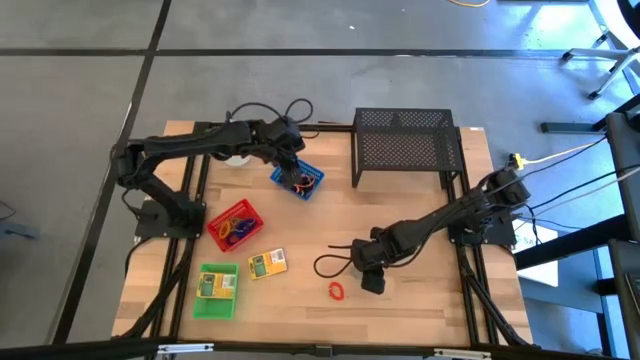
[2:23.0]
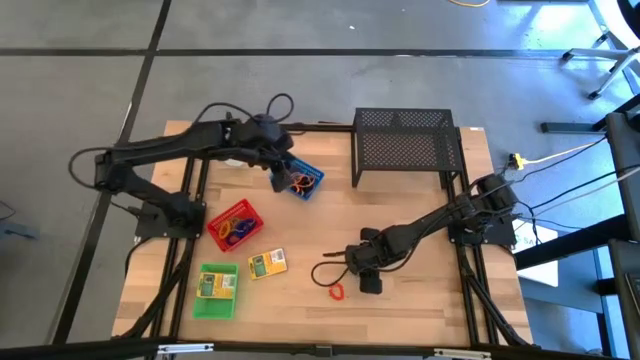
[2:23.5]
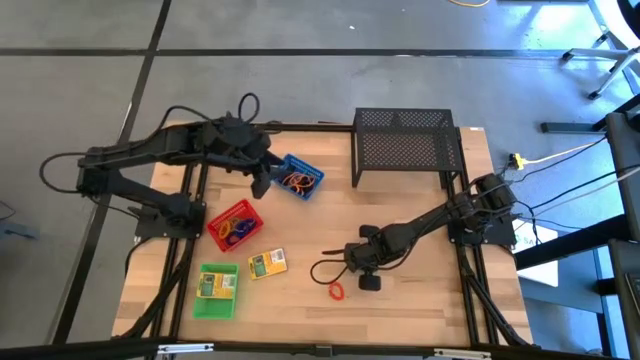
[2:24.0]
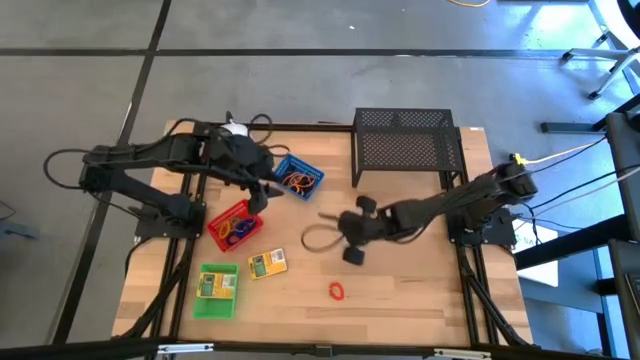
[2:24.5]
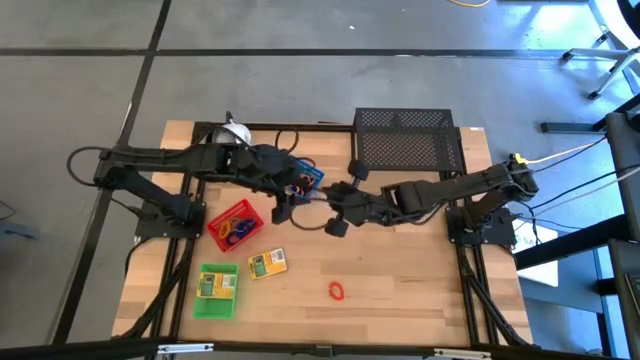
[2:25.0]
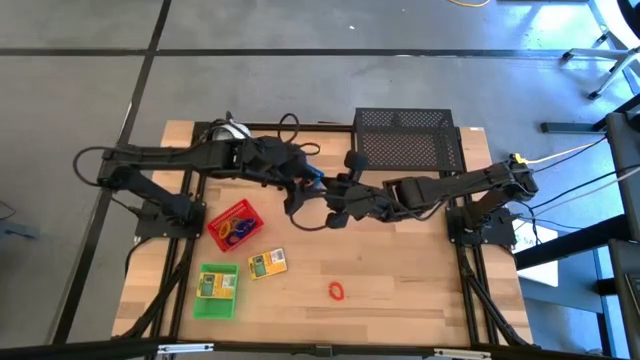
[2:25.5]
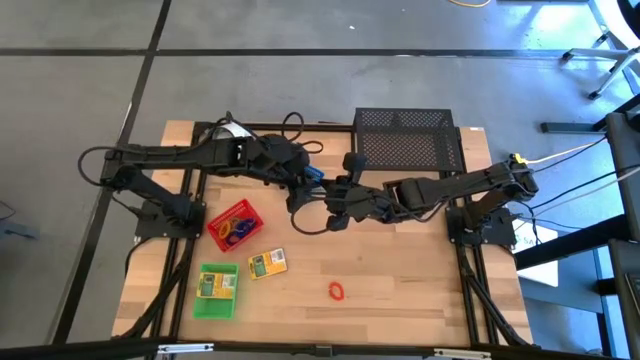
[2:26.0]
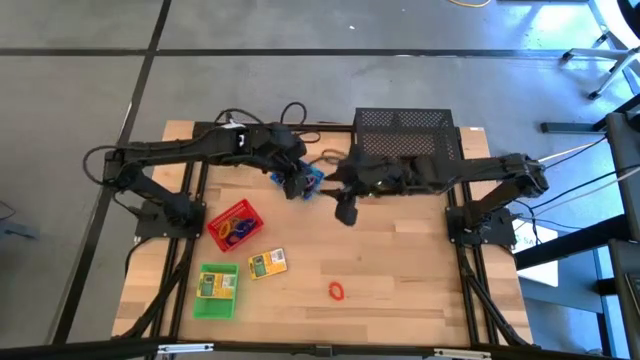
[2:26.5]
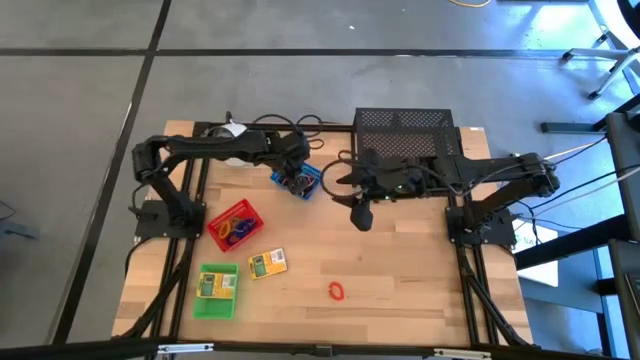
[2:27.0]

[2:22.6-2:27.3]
Task: Pick & Place Office Desk Supplies
Put the blue rubber band into the blue bin

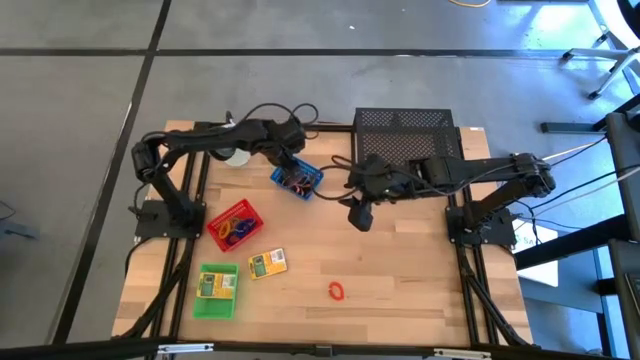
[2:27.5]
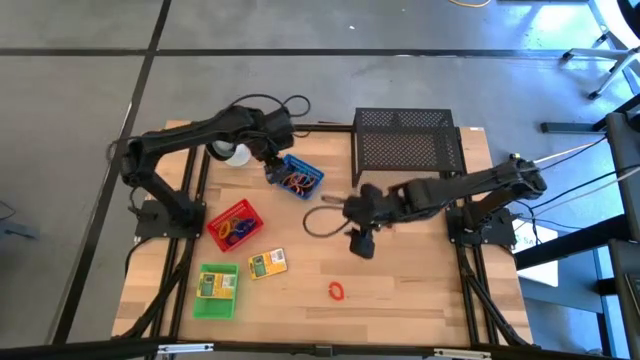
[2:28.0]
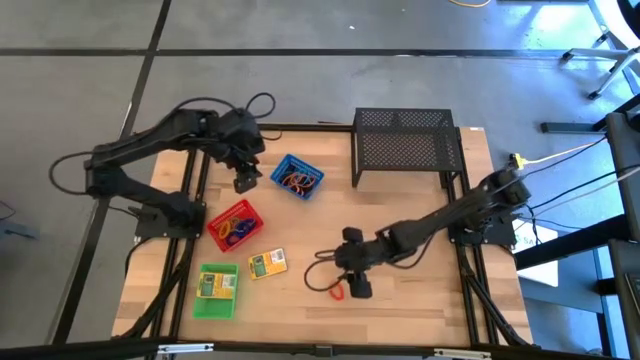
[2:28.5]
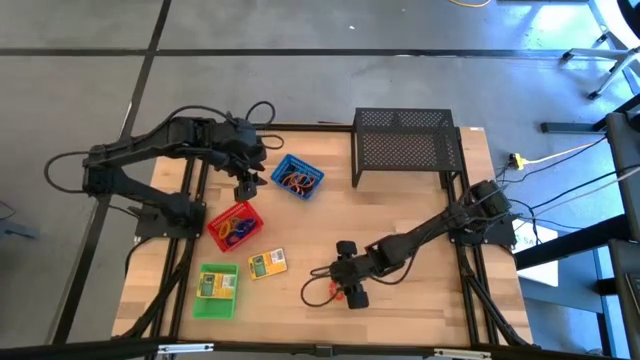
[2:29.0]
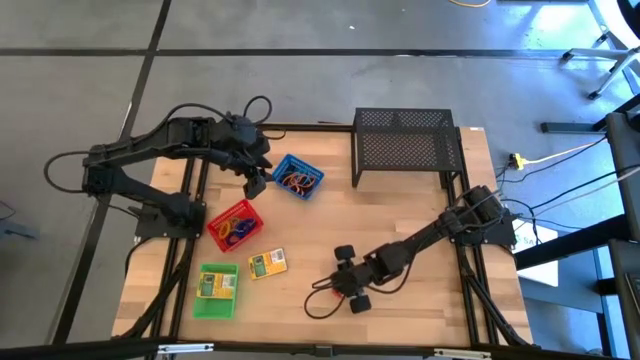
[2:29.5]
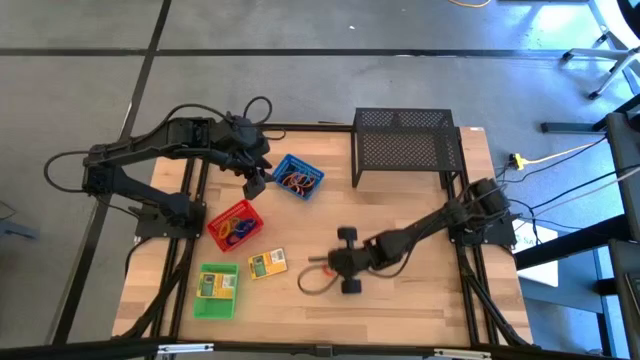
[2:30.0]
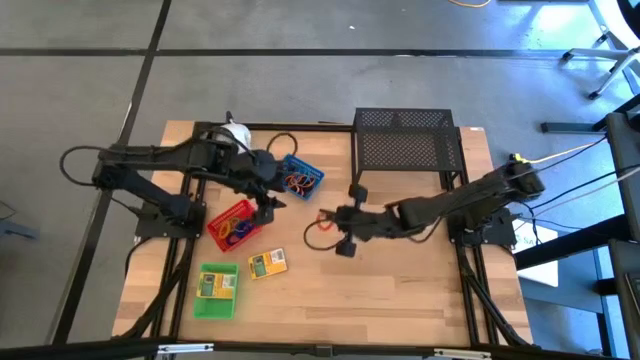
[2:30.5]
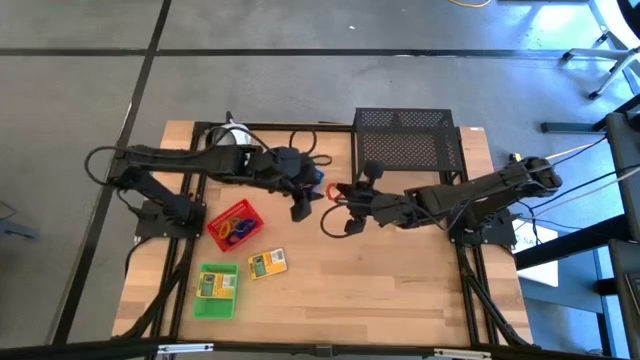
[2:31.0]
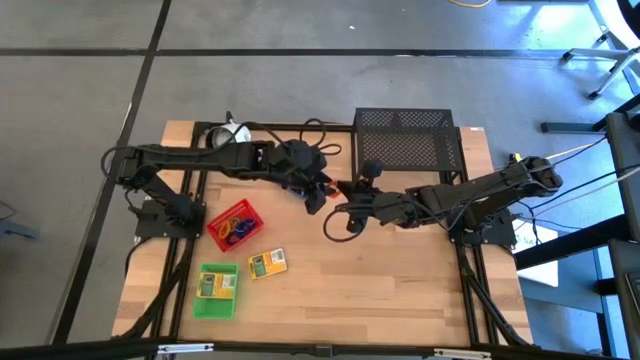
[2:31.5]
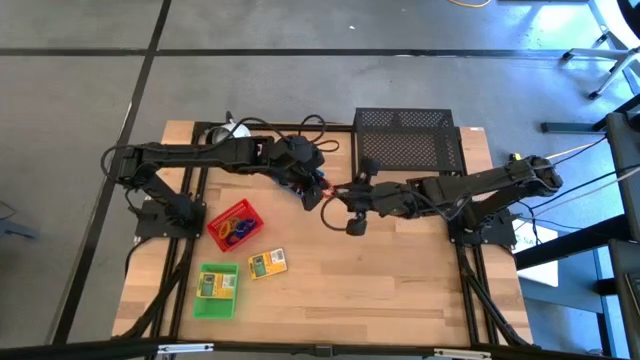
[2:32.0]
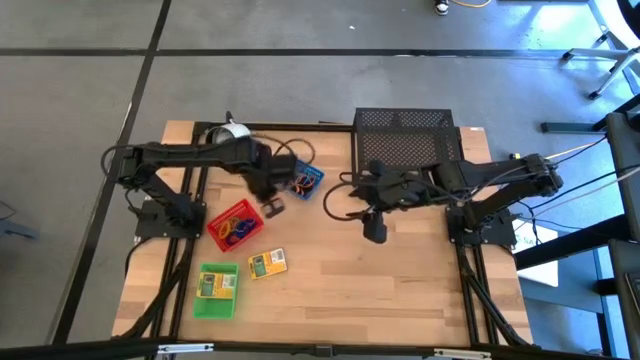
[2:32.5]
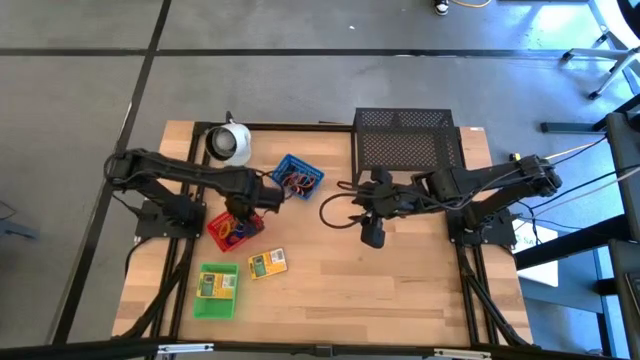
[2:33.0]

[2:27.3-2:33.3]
Put the orange spring keychain into the red bin

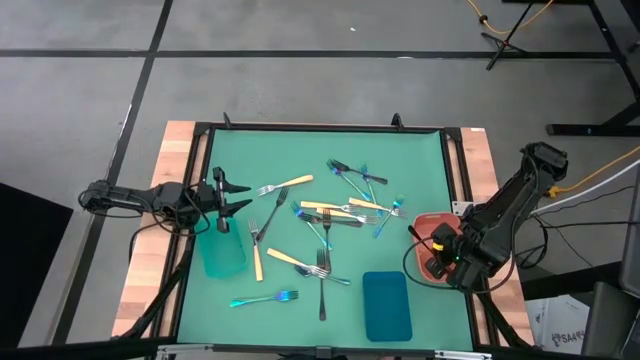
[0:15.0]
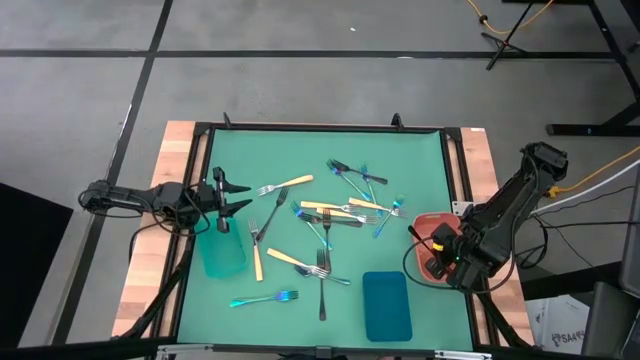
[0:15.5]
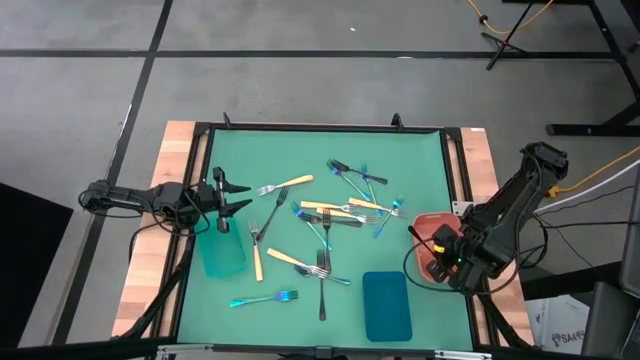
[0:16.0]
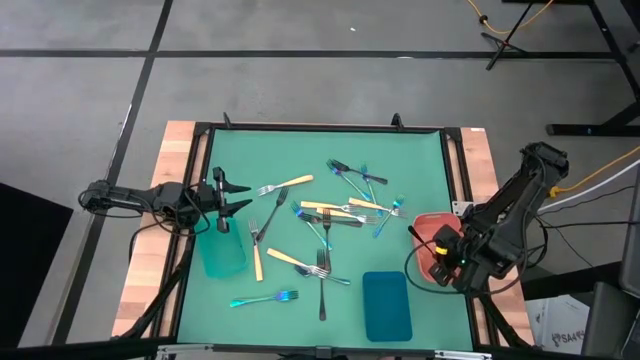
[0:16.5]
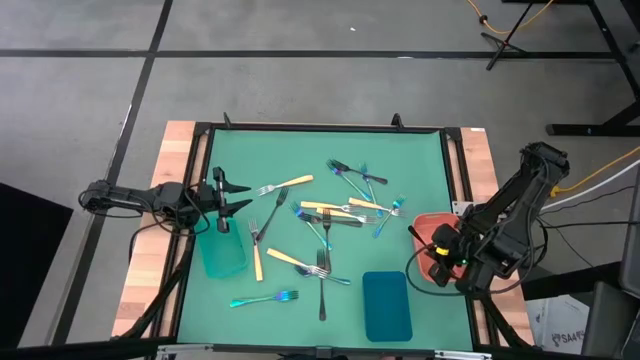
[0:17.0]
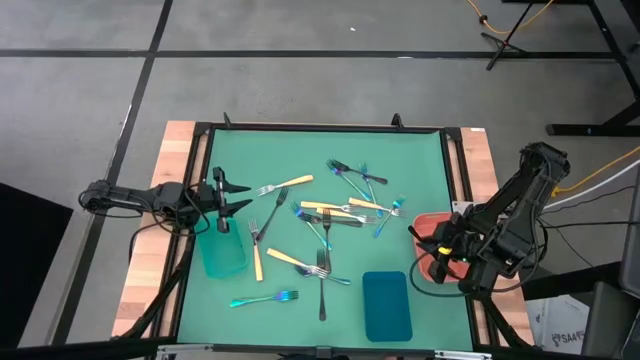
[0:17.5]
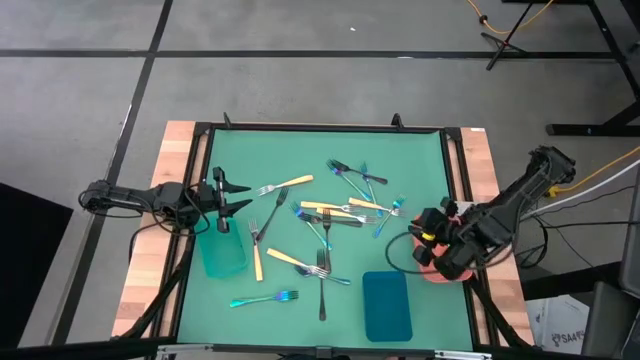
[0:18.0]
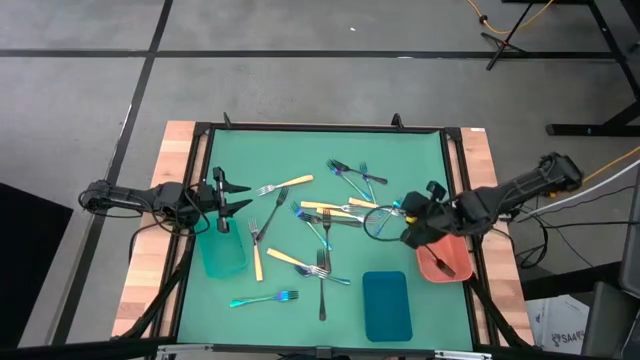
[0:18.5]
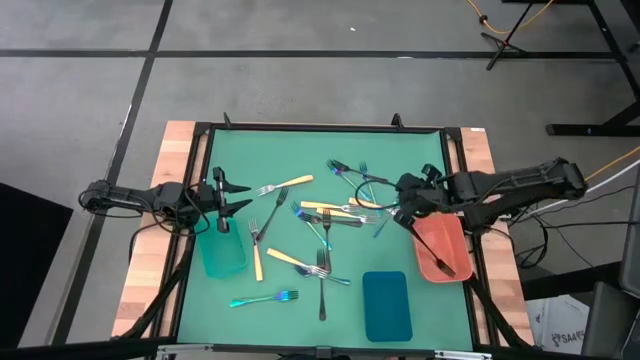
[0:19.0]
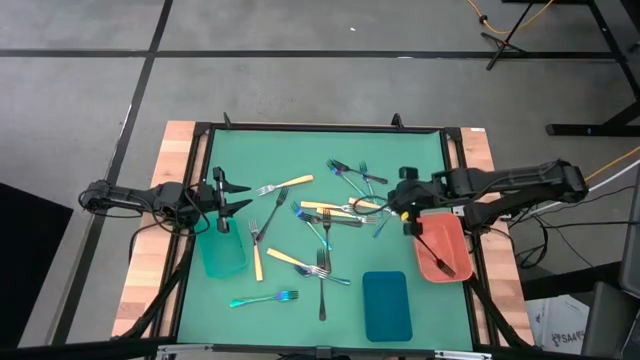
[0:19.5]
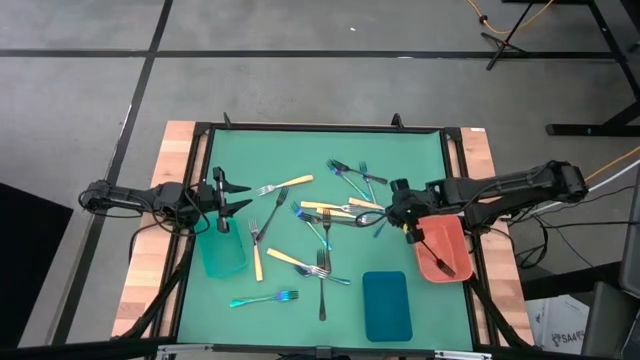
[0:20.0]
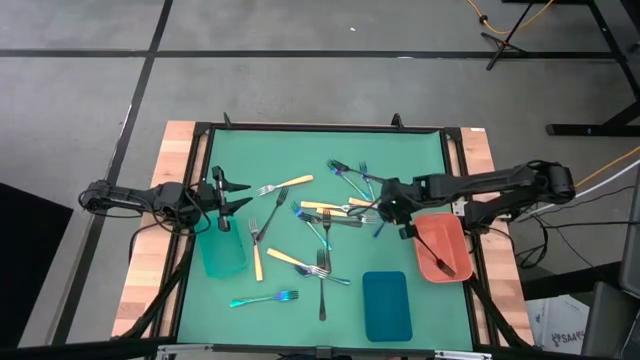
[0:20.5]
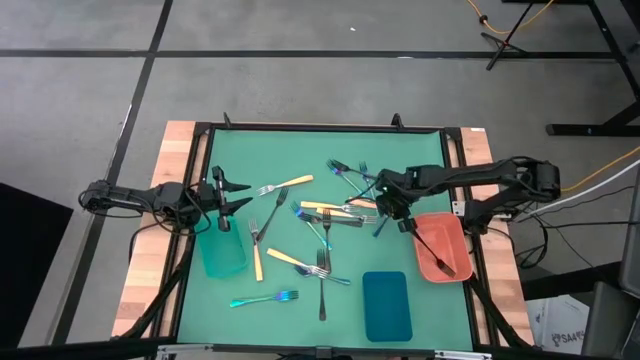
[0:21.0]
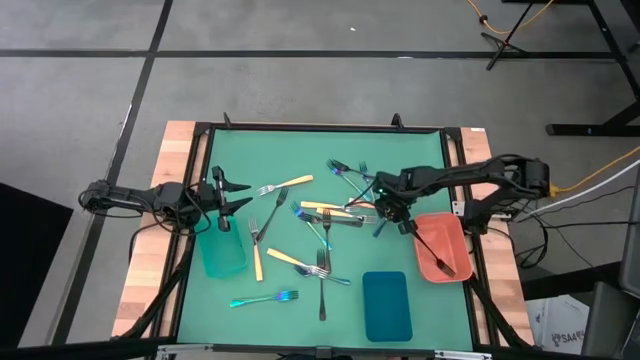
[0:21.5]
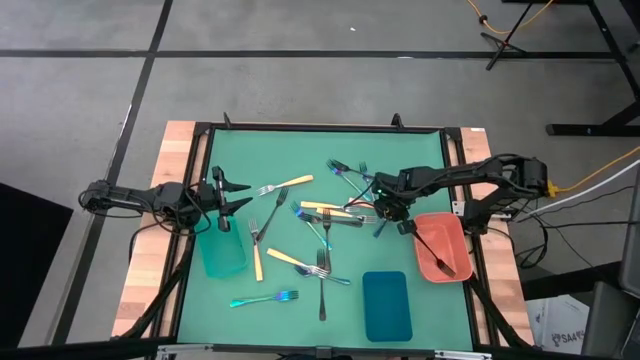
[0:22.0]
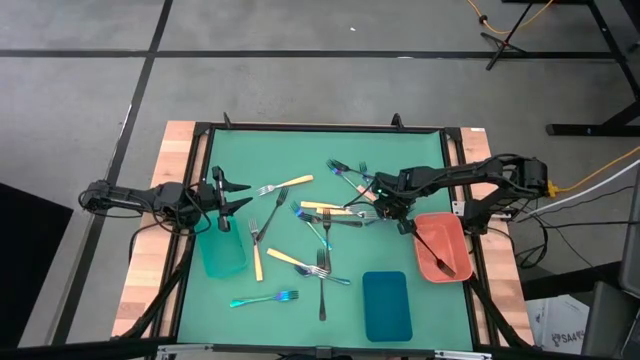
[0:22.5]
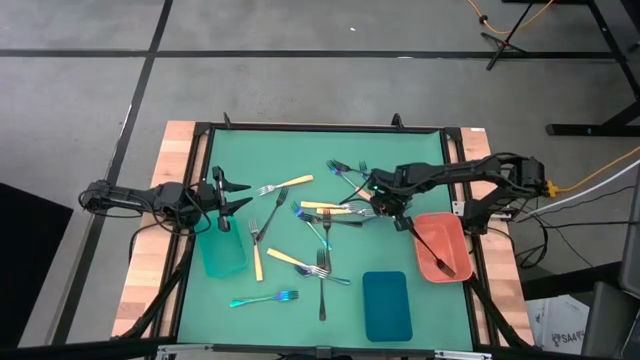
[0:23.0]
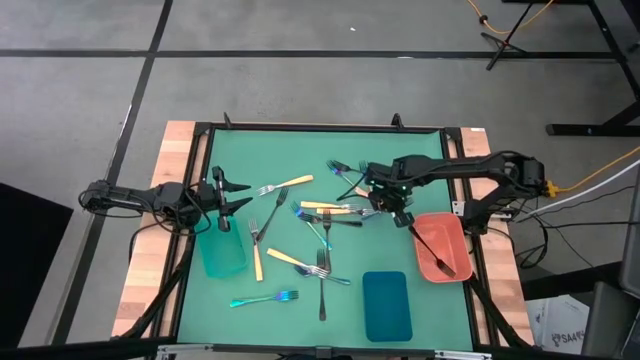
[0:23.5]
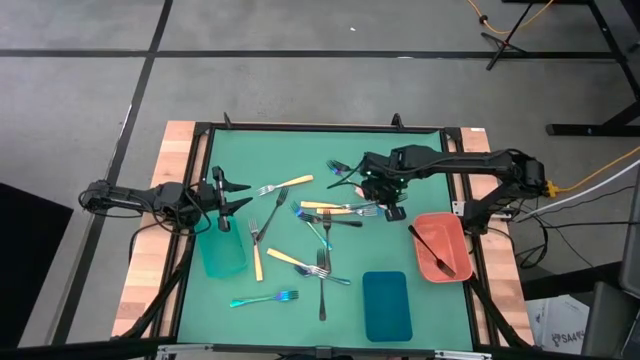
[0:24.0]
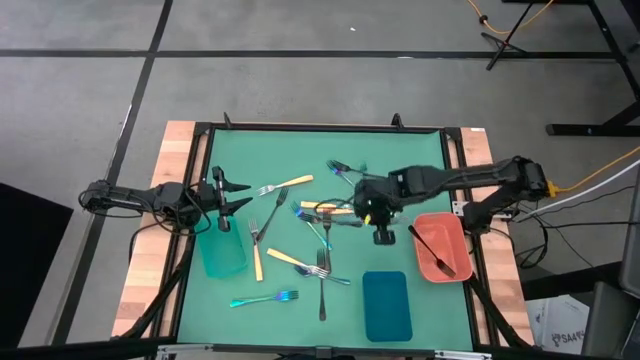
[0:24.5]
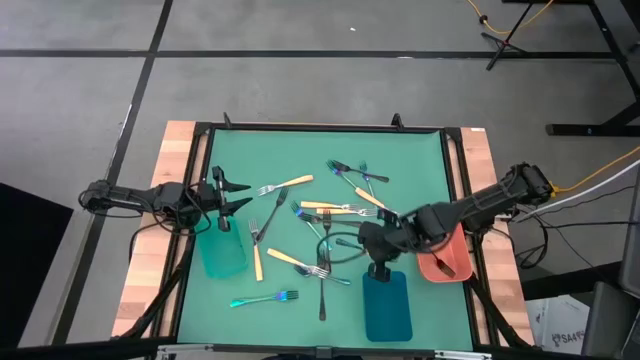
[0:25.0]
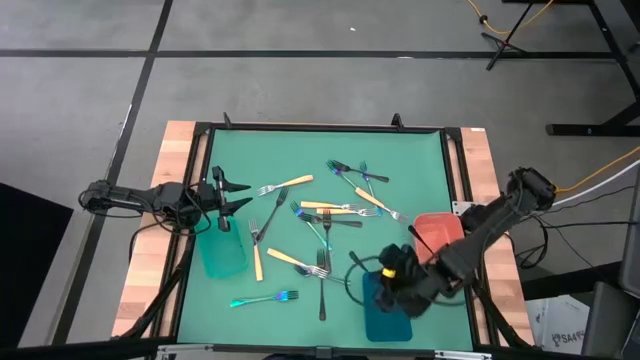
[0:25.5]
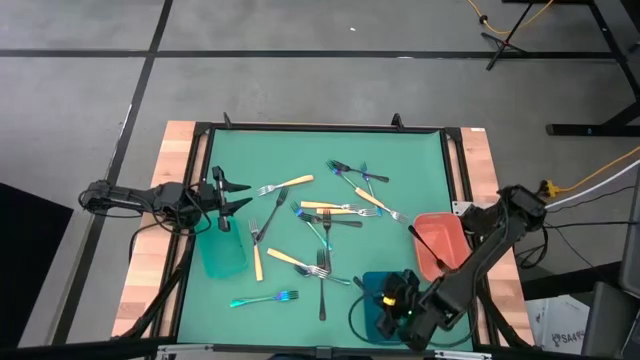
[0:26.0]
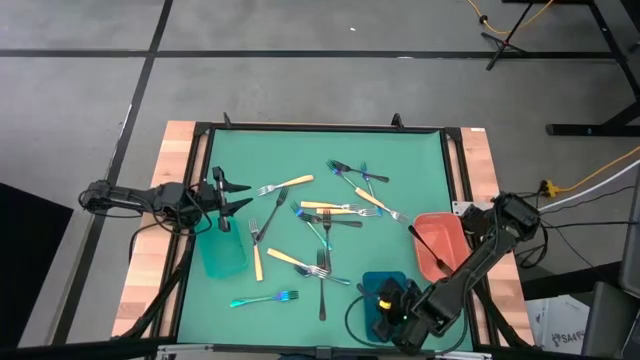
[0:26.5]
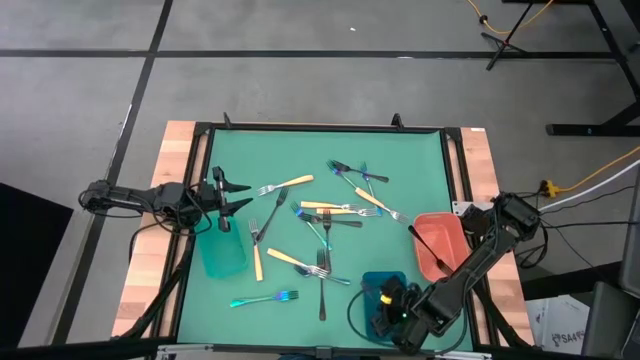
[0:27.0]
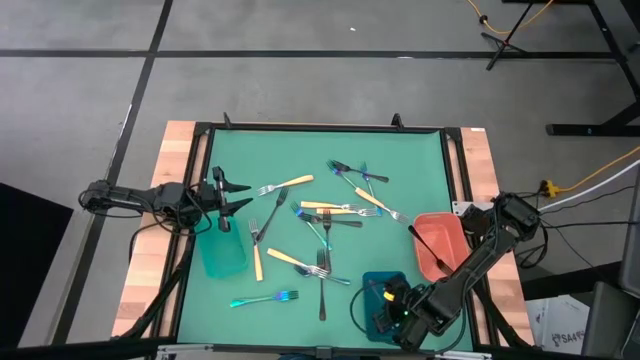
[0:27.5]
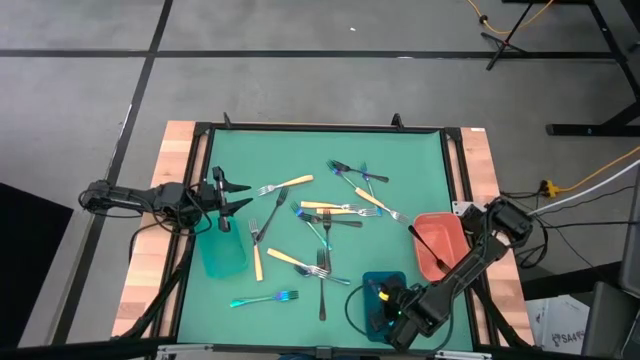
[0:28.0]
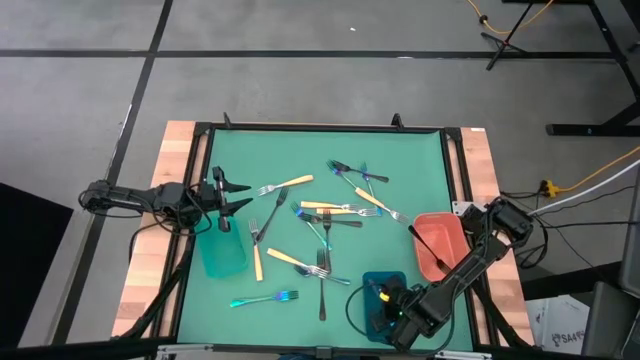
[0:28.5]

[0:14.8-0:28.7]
Task: Sort silverware by color (type)
Put the blue fork into the blue bin
